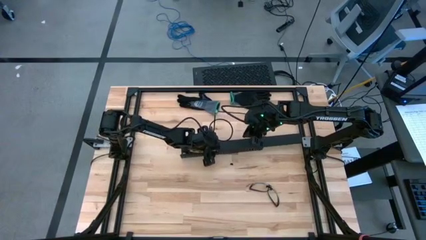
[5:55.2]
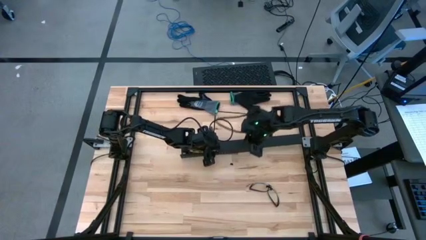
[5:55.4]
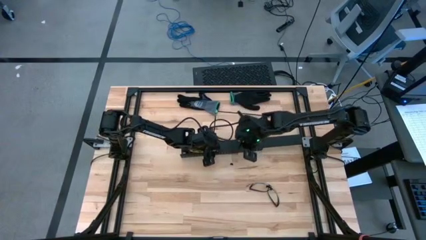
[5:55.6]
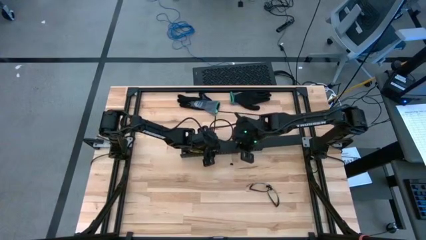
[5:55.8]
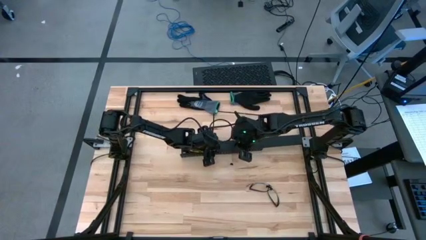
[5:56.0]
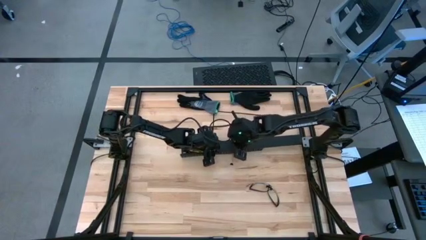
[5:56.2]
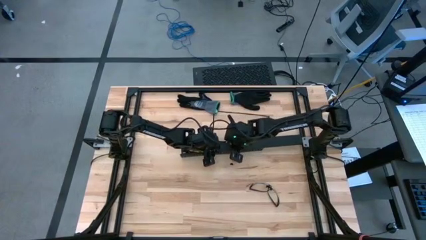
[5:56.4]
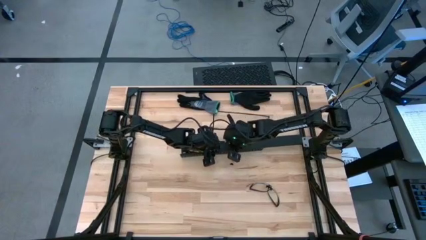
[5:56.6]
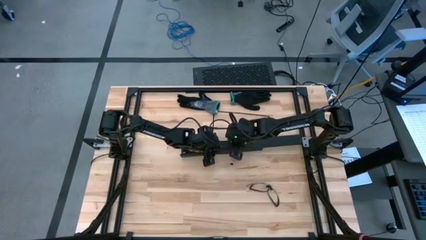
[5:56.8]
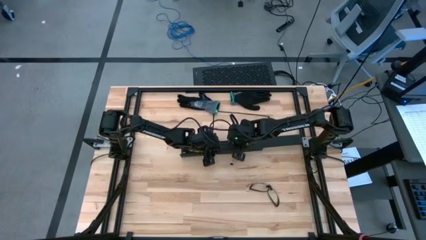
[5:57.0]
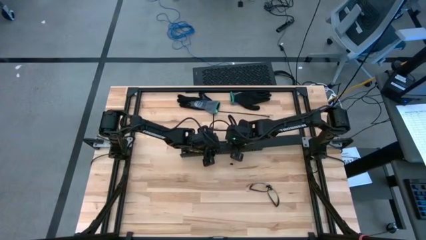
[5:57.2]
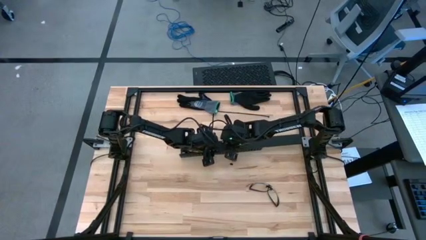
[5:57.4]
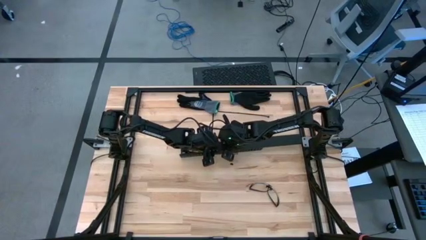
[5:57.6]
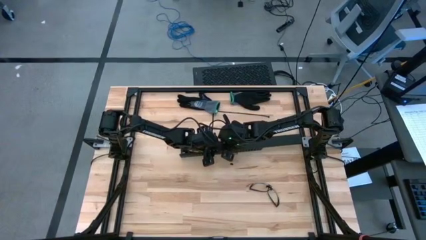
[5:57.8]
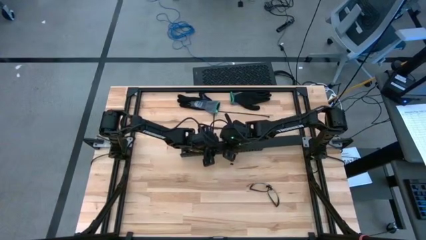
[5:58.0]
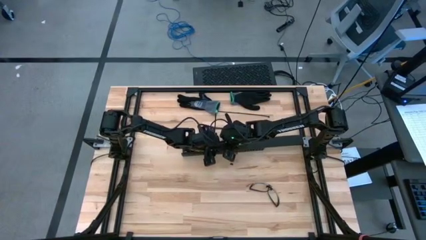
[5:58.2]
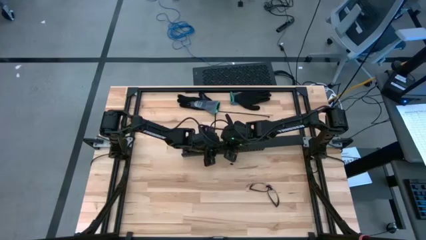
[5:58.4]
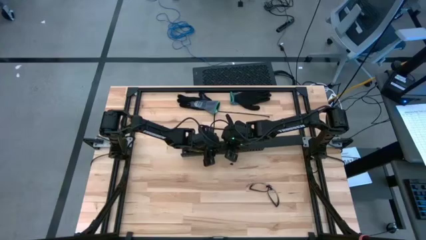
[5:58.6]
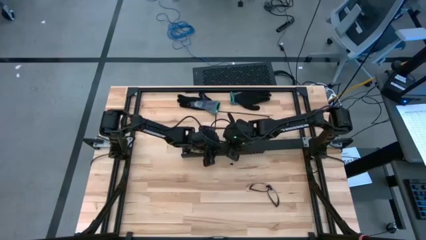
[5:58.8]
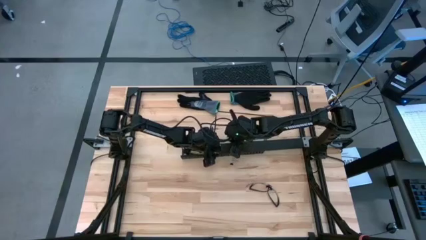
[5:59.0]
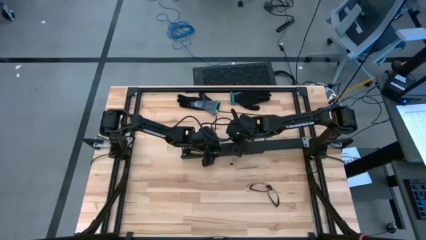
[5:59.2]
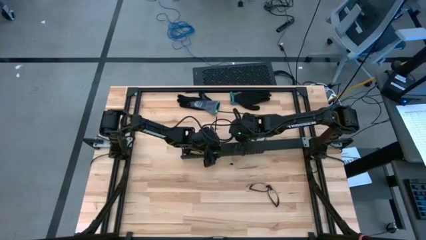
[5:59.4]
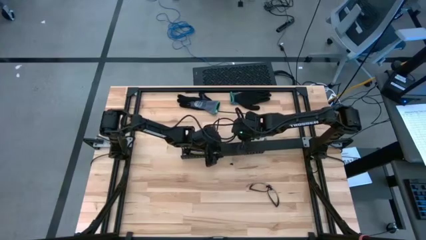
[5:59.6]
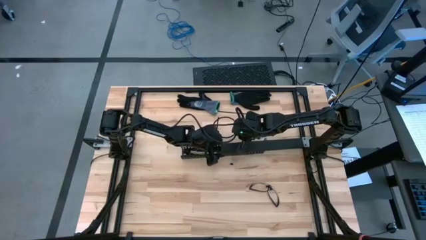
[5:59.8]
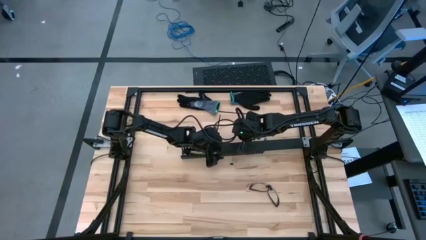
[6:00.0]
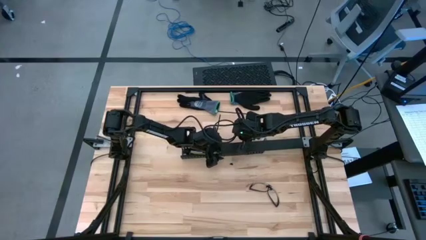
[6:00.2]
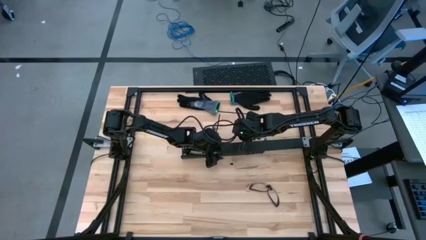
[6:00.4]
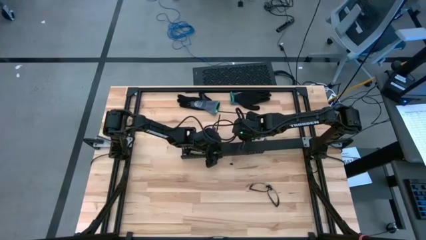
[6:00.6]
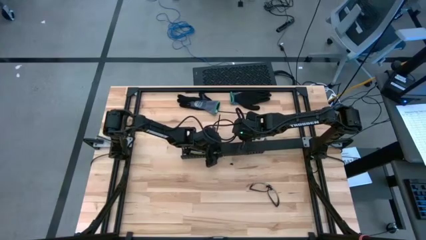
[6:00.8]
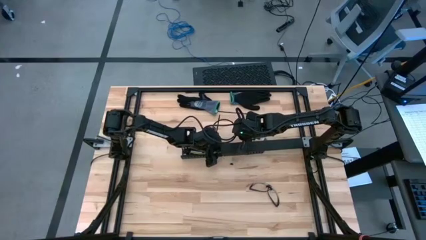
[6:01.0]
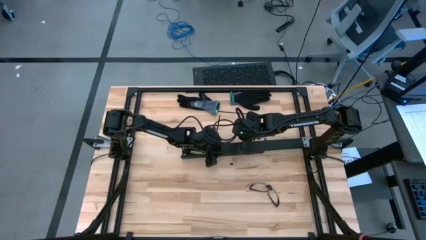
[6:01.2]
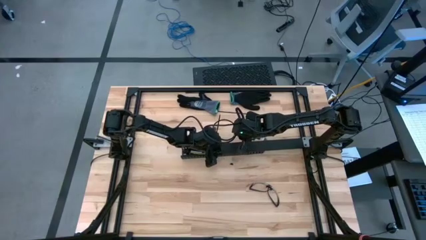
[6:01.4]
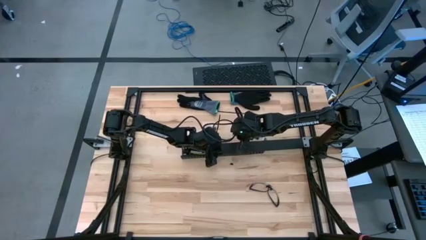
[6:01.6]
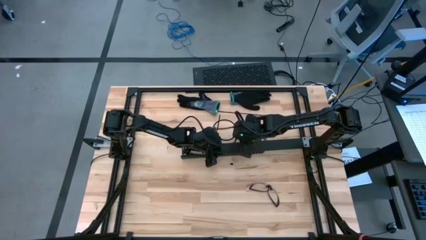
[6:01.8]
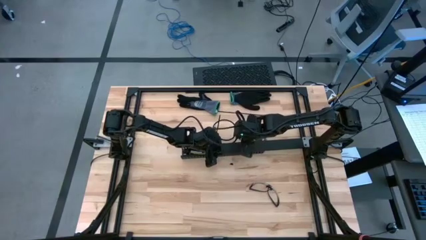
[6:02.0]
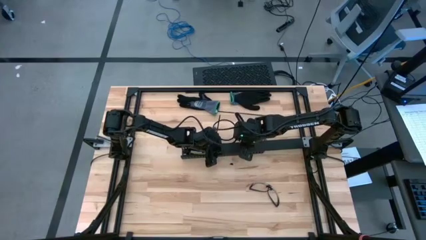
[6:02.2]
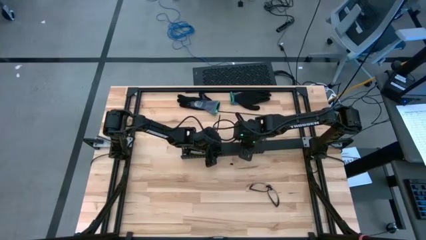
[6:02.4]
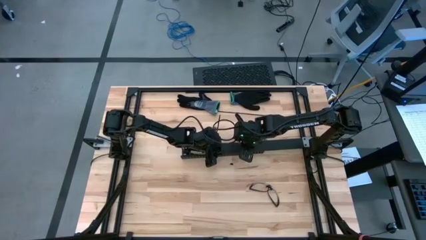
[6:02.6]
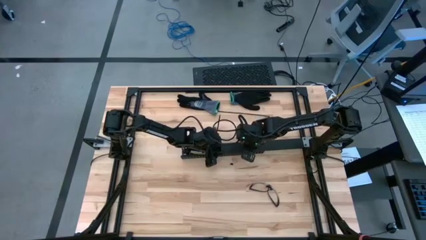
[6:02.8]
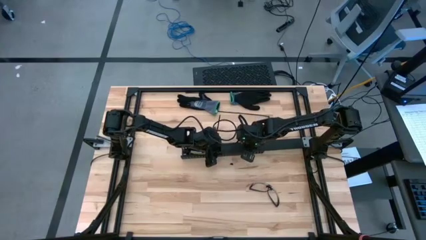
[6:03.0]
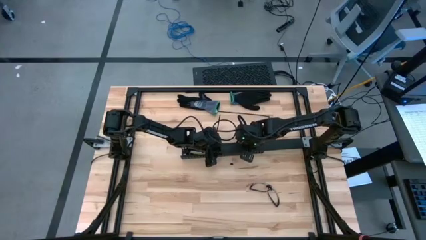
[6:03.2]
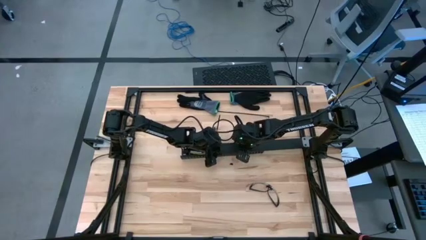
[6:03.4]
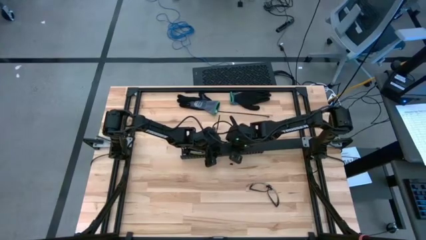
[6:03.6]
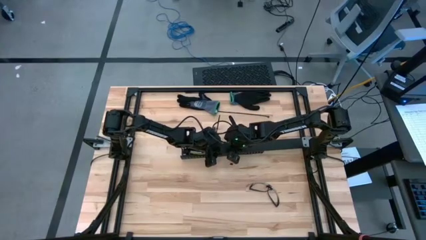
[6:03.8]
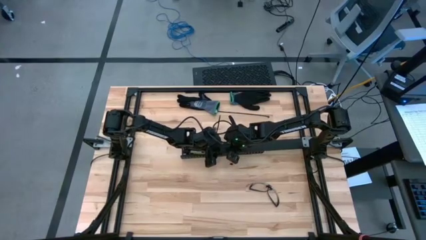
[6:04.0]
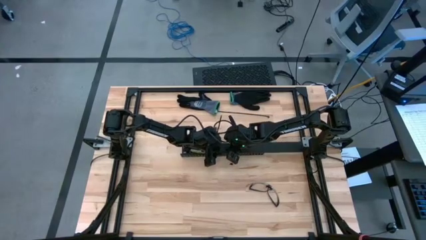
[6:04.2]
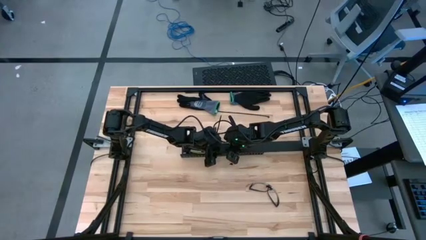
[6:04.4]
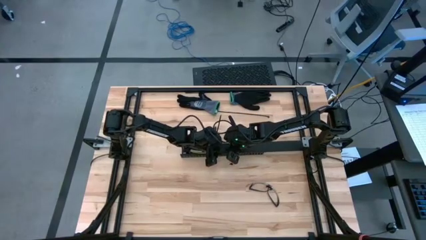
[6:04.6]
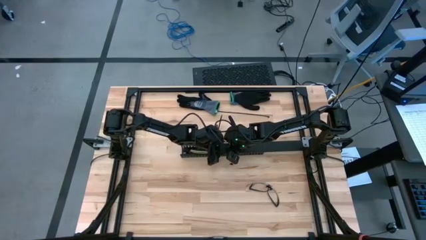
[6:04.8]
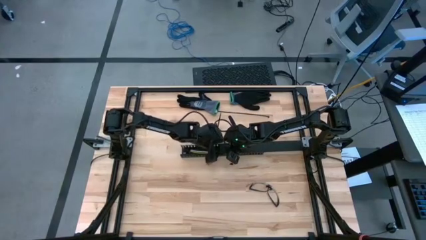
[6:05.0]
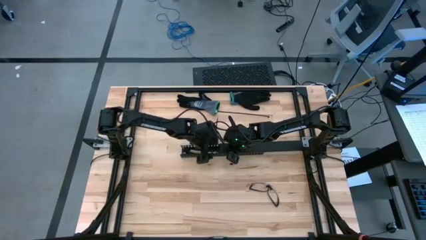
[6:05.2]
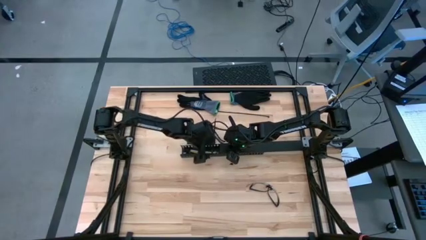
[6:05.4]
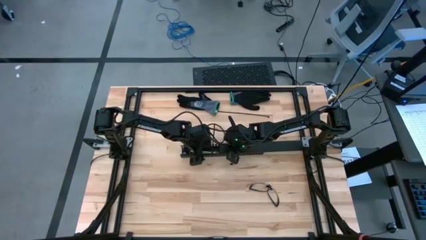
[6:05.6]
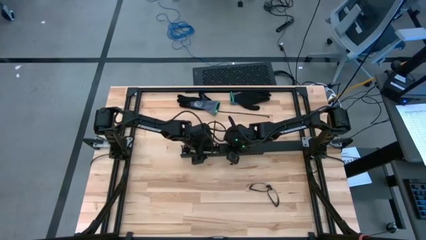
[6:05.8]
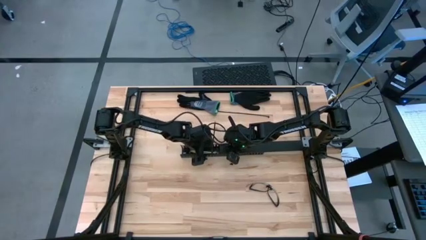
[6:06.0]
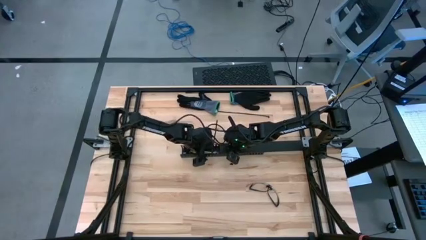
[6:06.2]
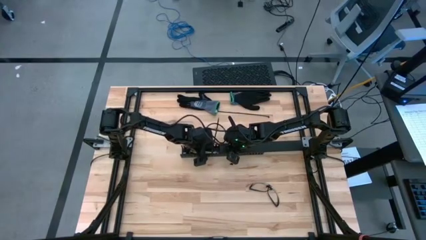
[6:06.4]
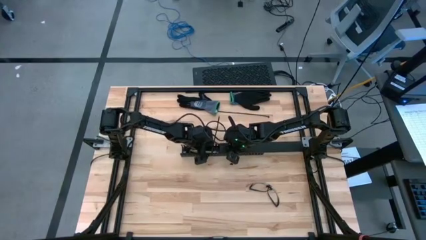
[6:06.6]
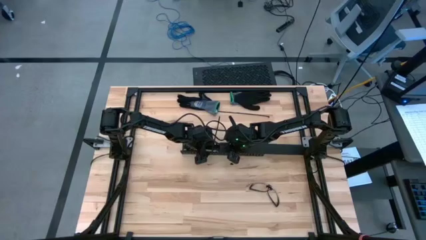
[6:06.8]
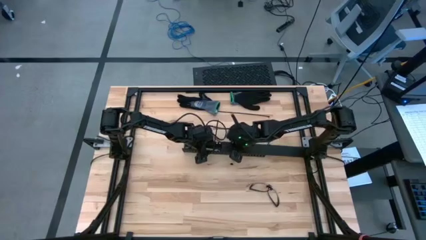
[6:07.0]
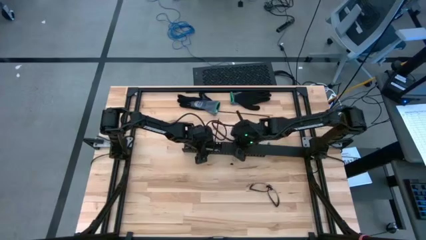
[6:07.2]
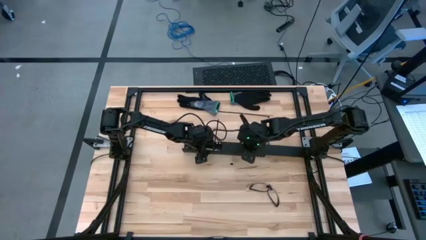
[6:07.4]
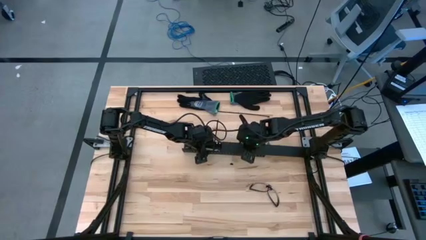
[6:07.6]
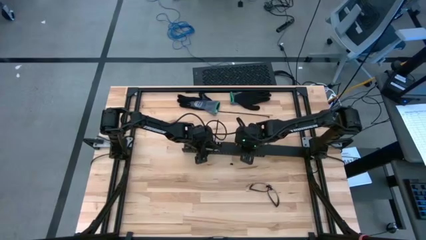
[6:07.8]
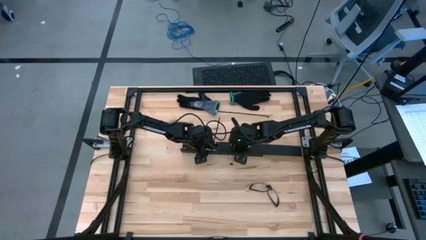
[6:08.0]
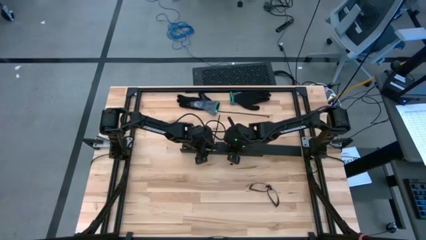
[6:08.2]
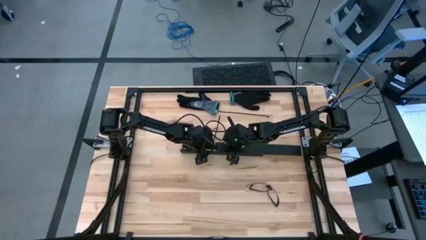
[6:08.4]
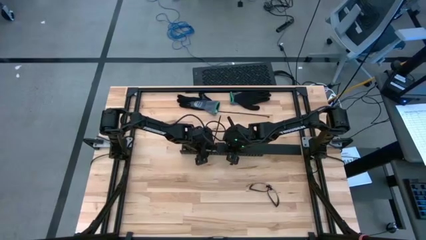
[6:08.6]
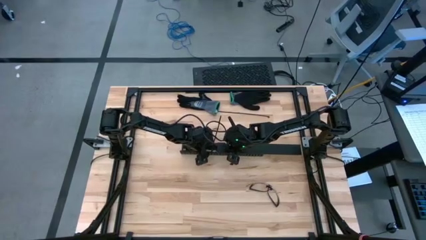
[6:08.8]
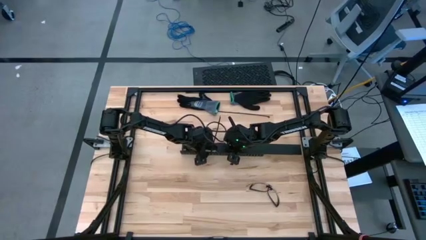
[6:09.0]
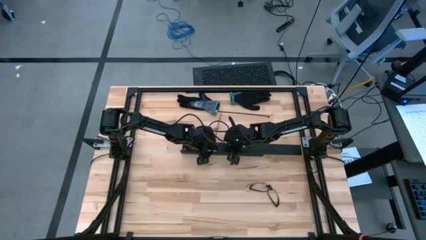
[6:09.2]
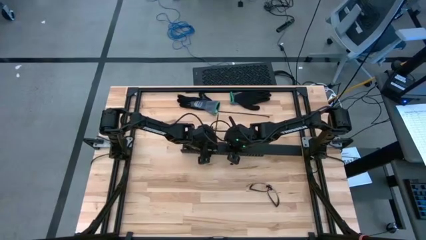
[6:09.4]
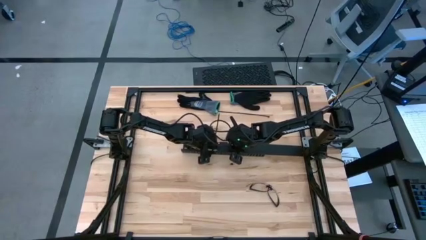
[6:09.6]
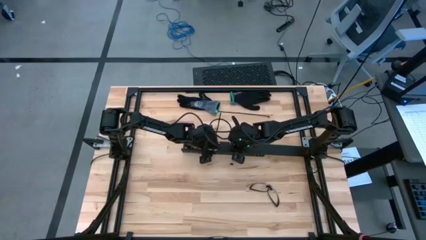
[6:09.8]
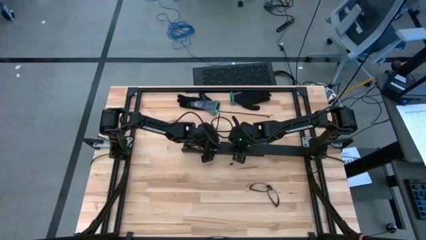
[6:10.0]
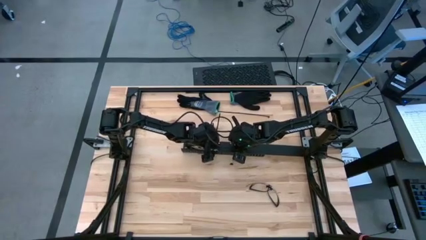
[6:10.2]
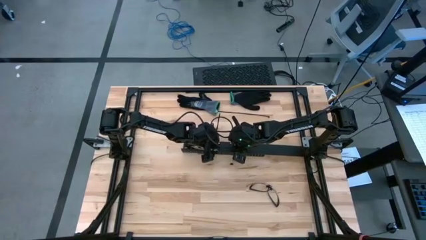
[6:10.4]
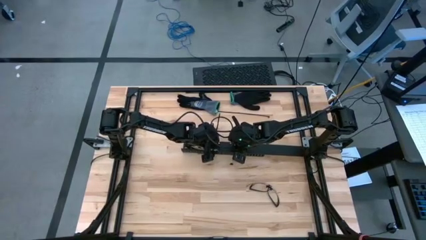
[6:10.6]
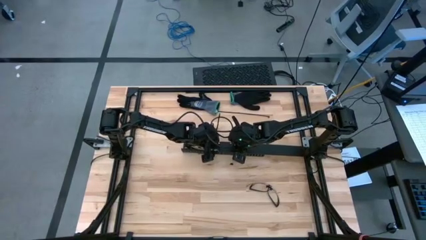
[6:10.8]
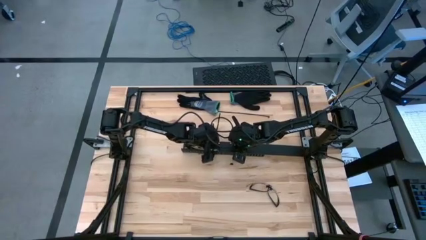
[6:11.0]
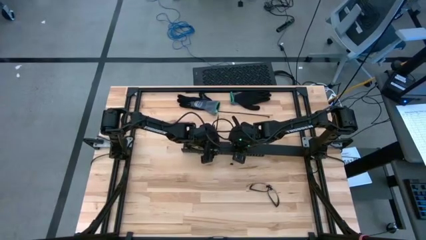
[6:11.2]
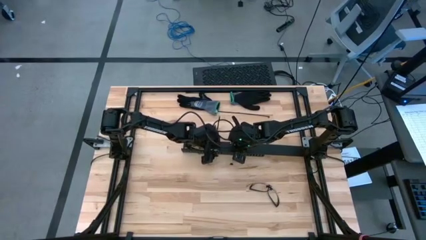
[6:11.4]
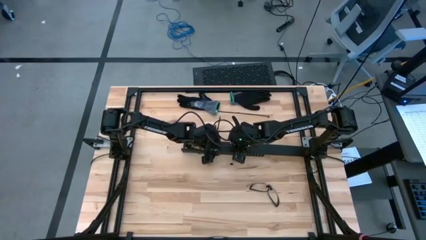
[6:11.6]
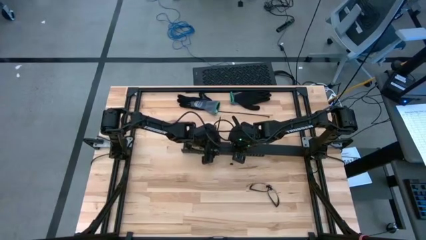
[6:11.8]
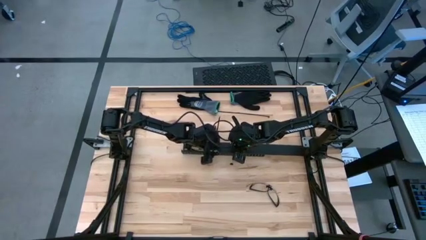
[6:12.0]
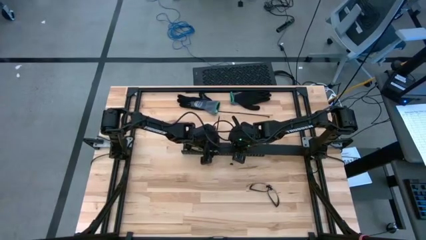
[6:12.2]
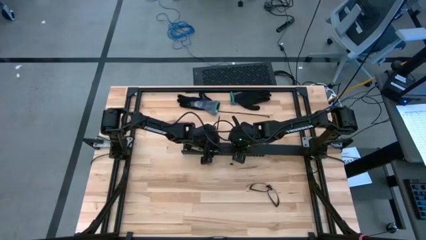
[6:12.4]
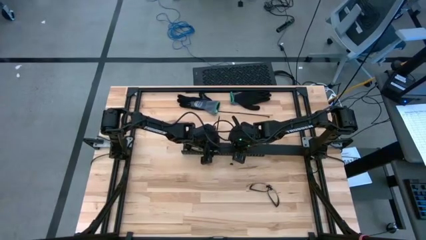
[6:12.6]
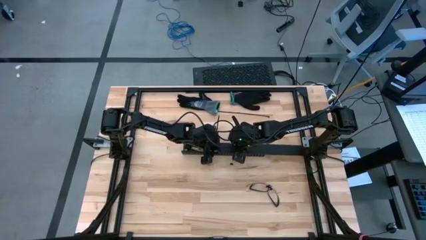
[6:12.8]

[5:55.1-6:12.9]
Task: Ziptie cables
Close the black cable duct
